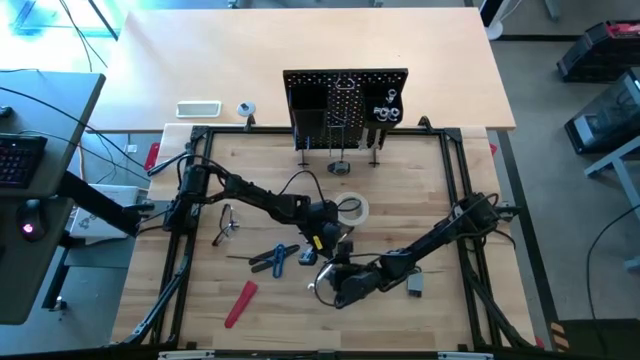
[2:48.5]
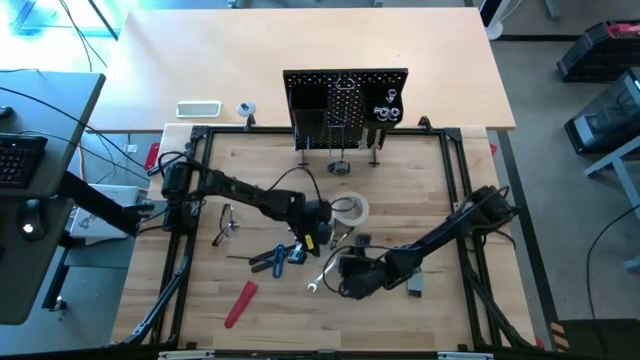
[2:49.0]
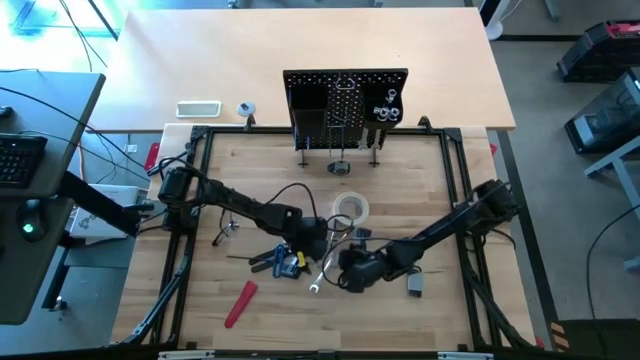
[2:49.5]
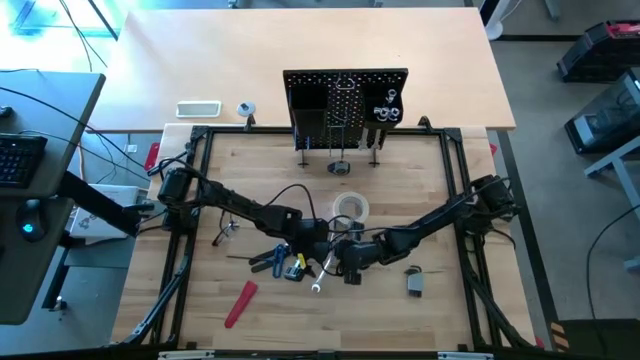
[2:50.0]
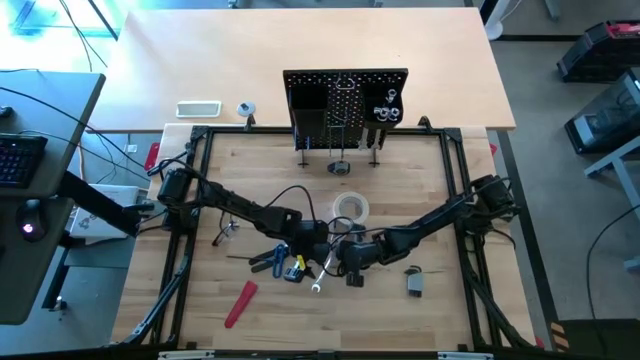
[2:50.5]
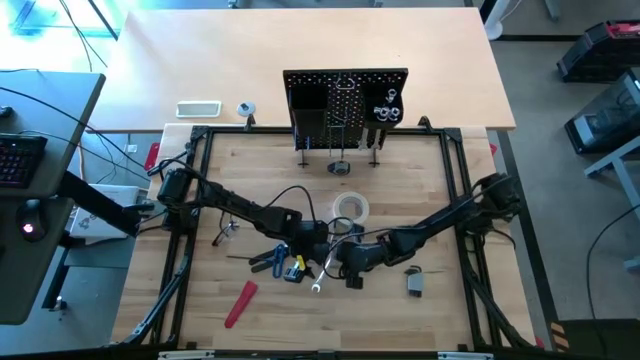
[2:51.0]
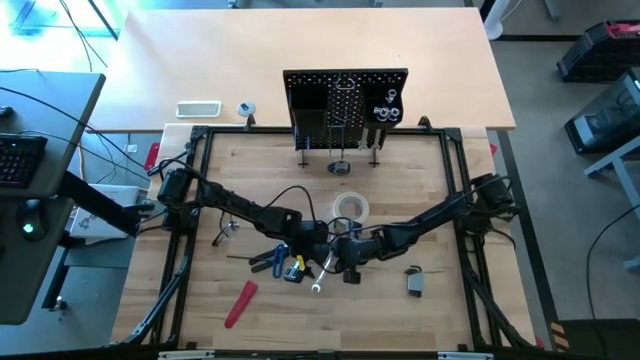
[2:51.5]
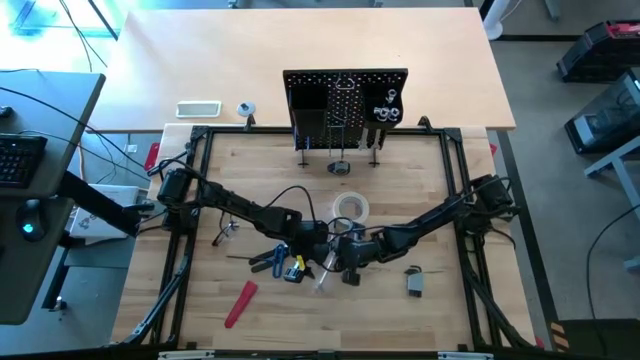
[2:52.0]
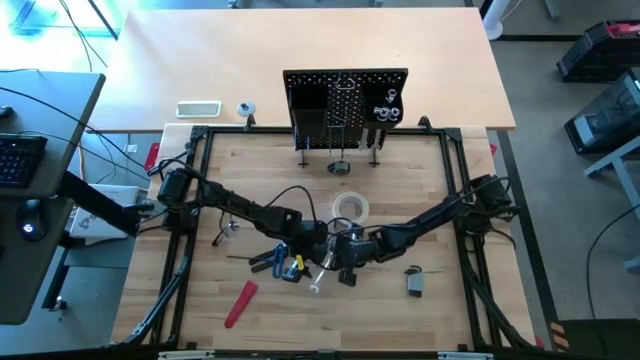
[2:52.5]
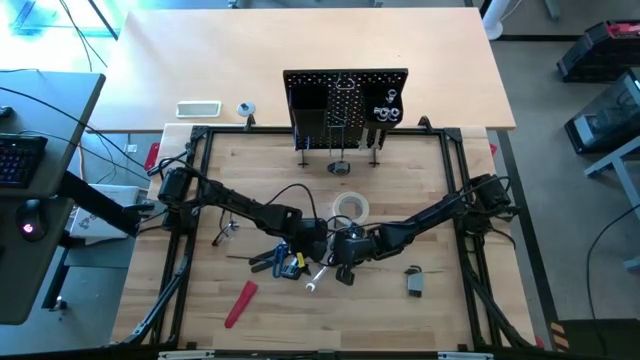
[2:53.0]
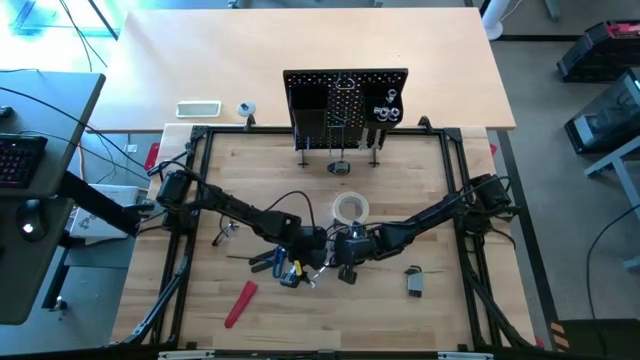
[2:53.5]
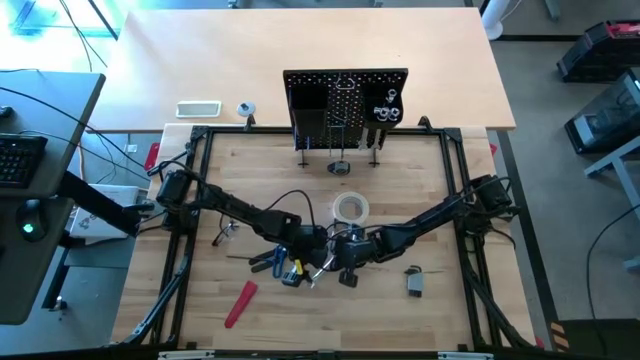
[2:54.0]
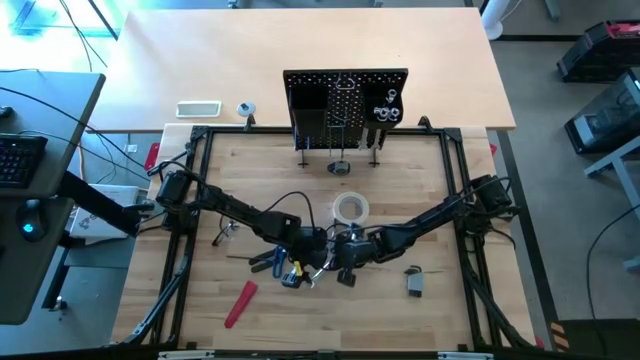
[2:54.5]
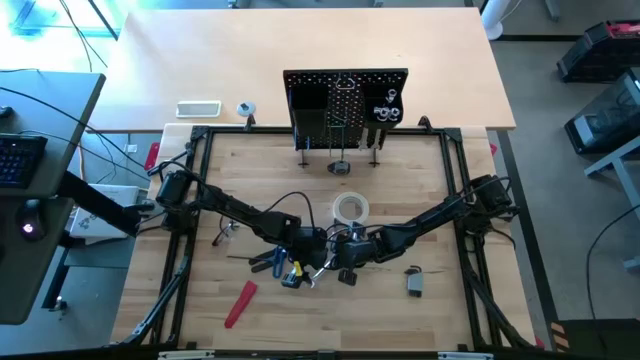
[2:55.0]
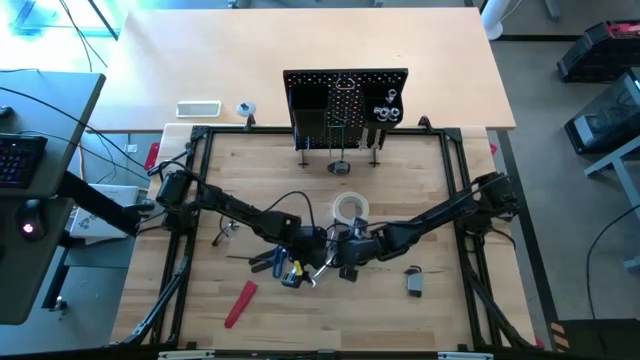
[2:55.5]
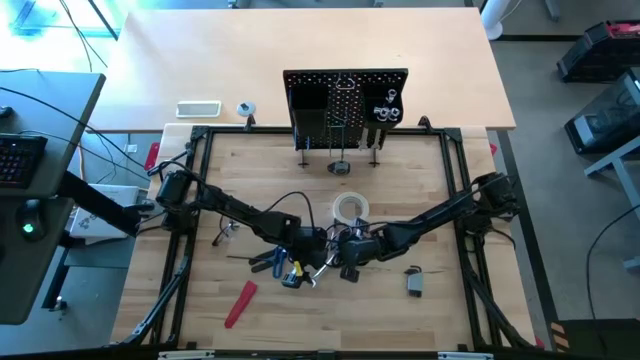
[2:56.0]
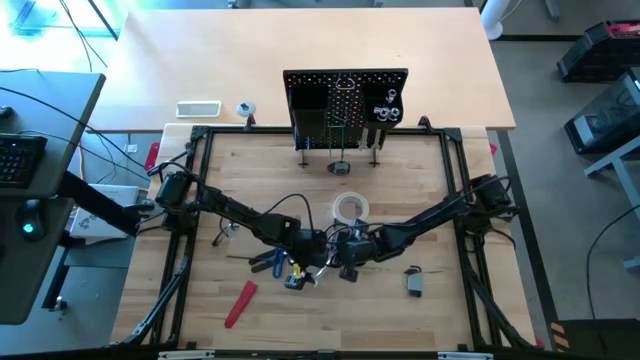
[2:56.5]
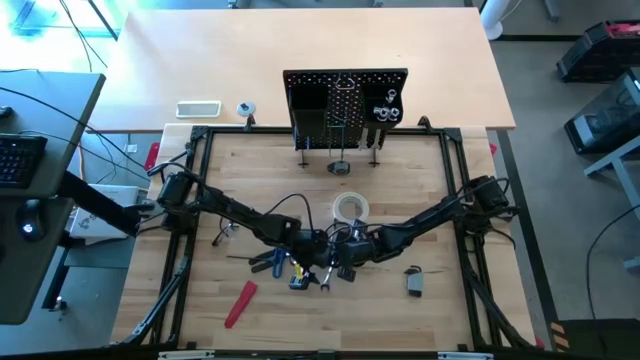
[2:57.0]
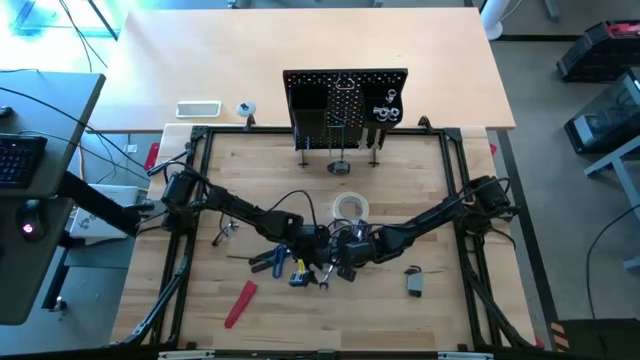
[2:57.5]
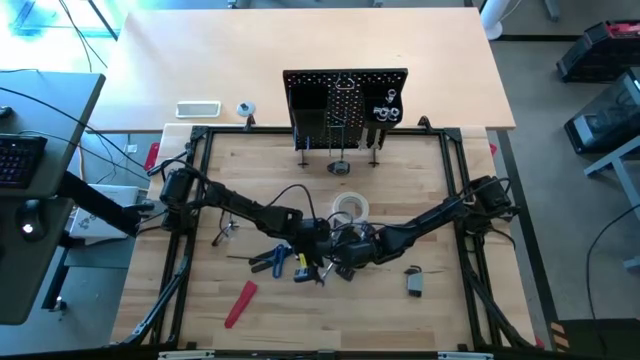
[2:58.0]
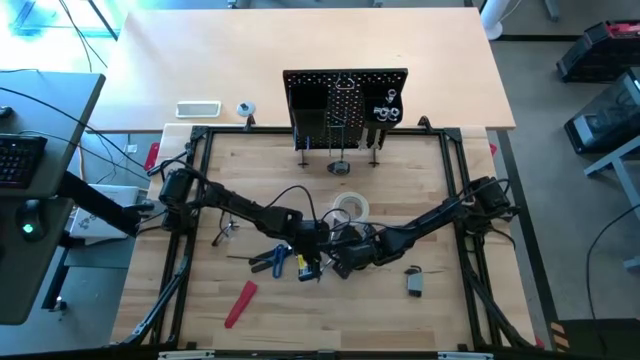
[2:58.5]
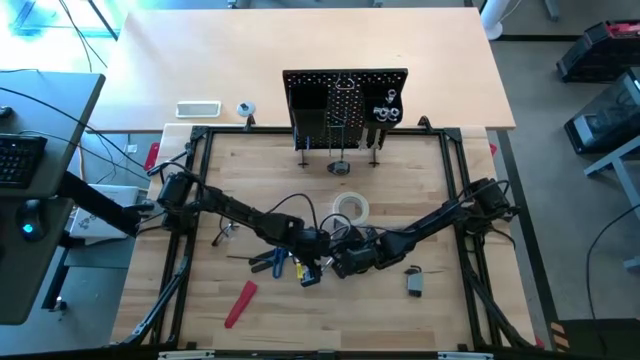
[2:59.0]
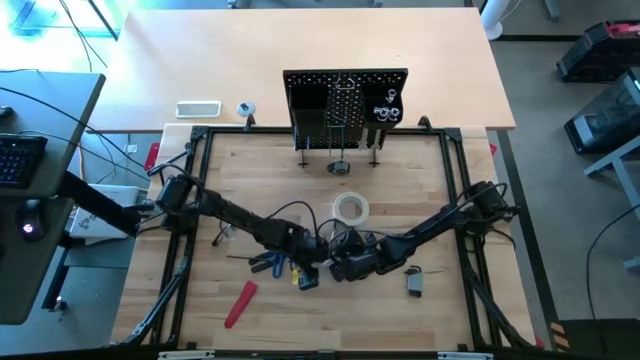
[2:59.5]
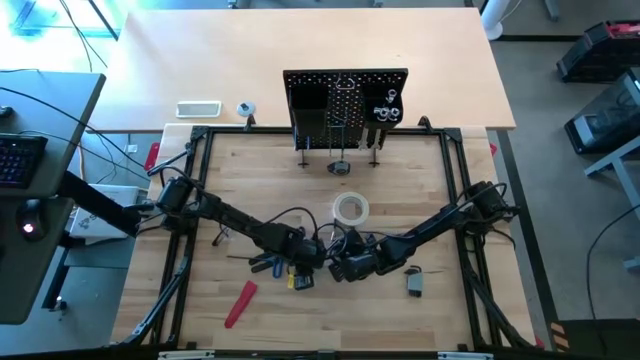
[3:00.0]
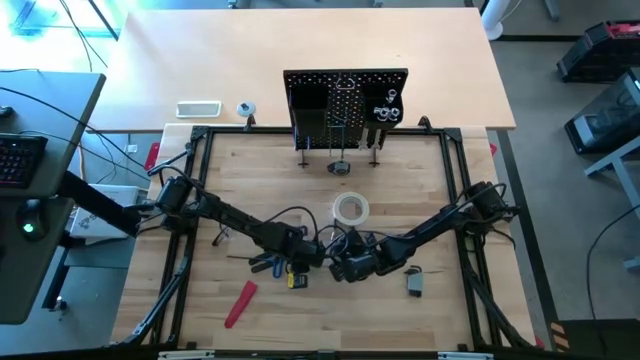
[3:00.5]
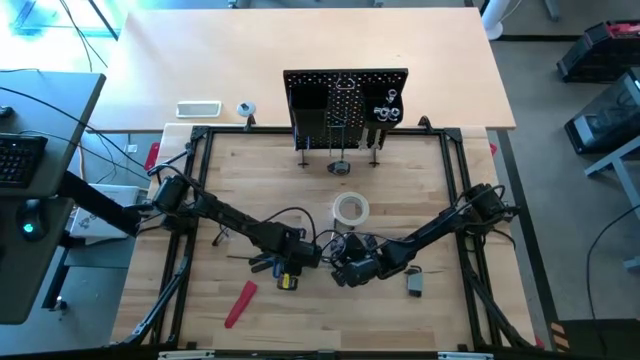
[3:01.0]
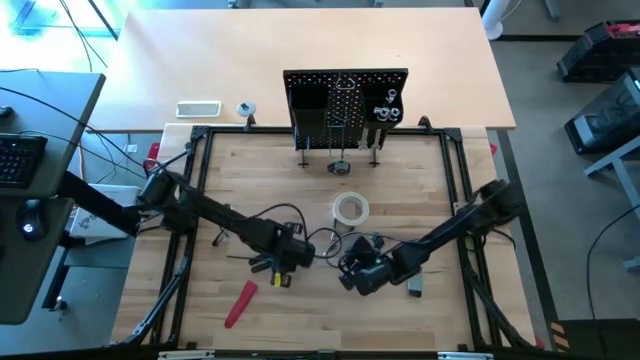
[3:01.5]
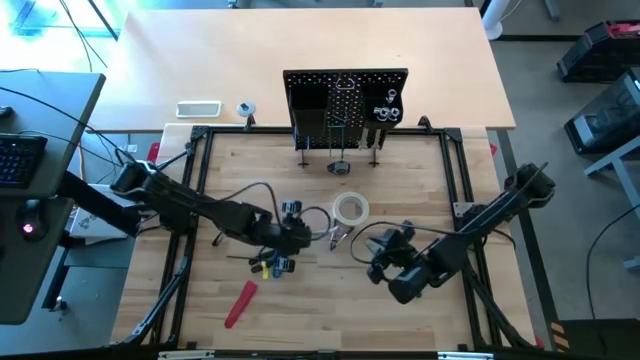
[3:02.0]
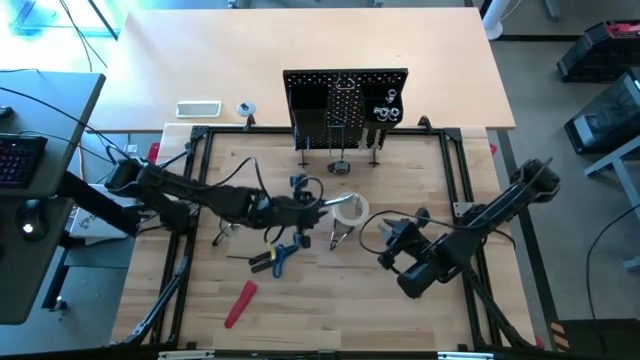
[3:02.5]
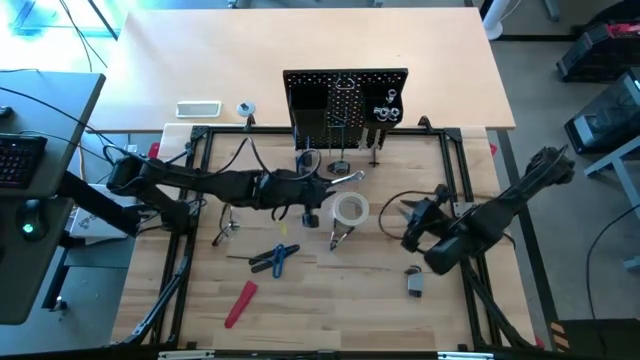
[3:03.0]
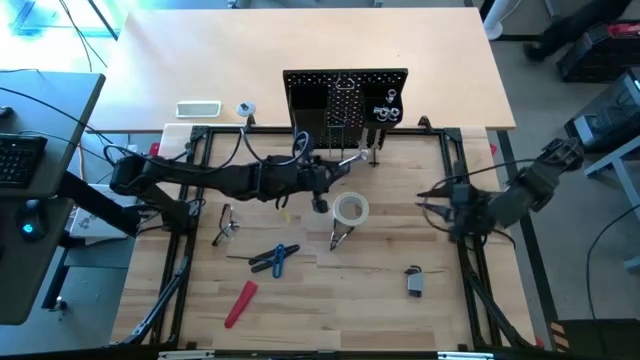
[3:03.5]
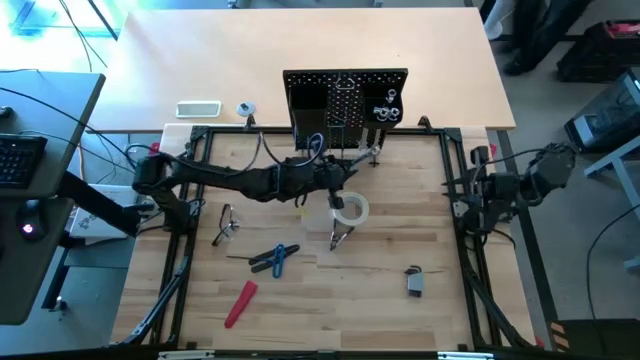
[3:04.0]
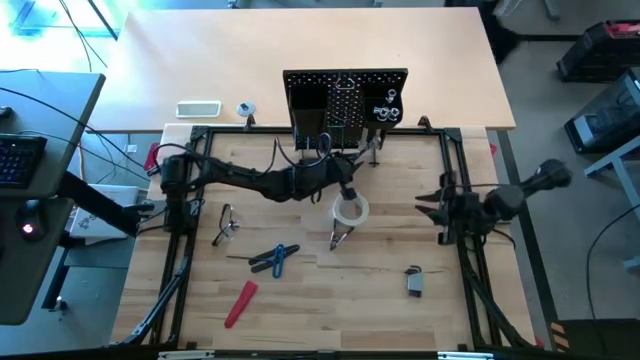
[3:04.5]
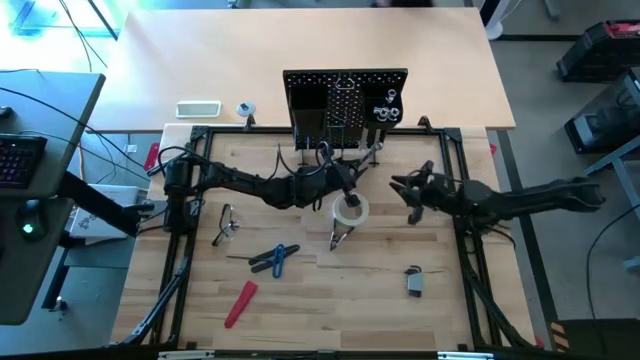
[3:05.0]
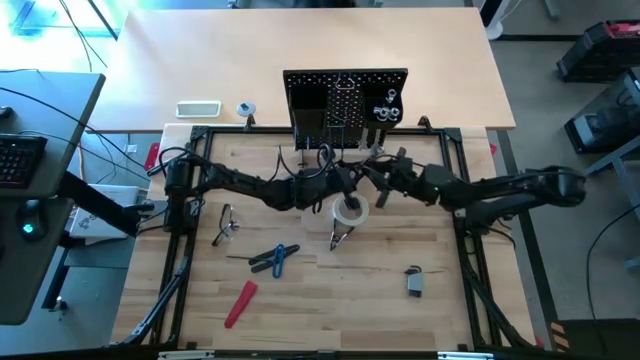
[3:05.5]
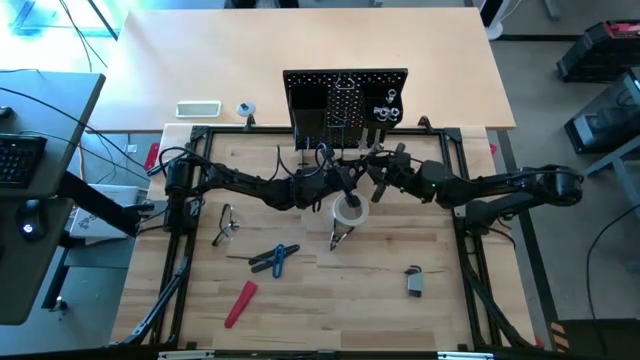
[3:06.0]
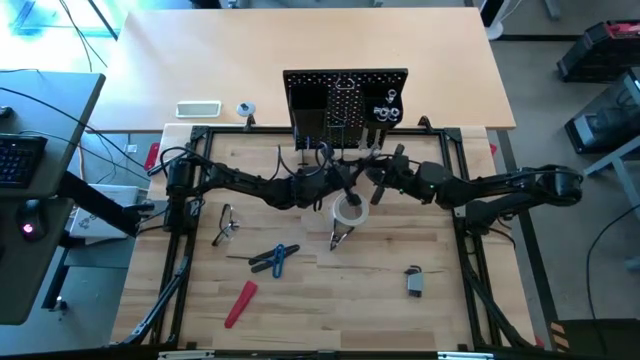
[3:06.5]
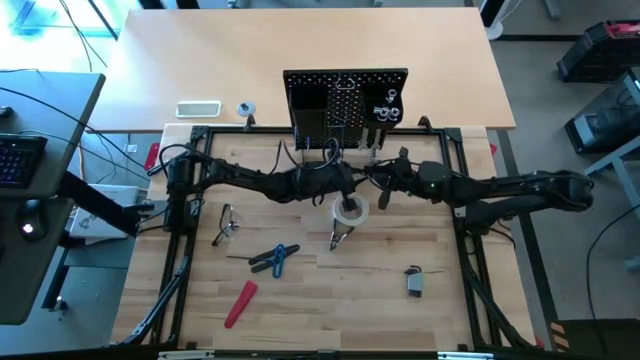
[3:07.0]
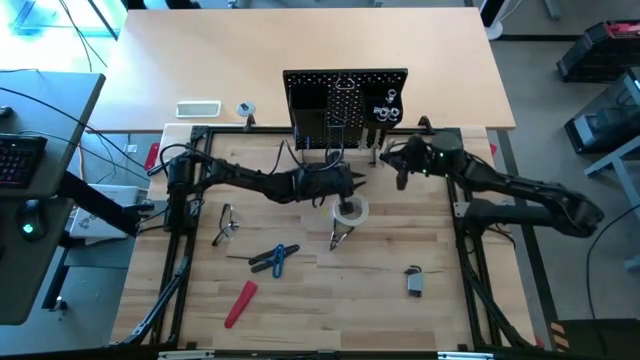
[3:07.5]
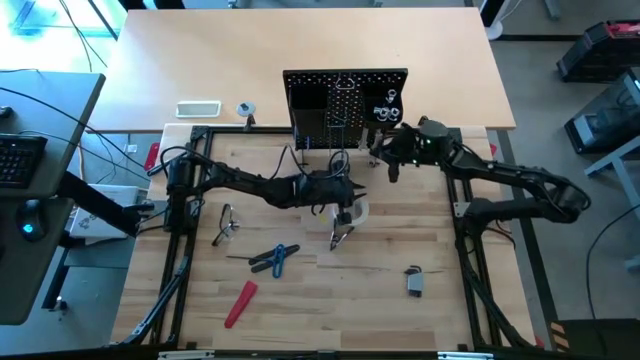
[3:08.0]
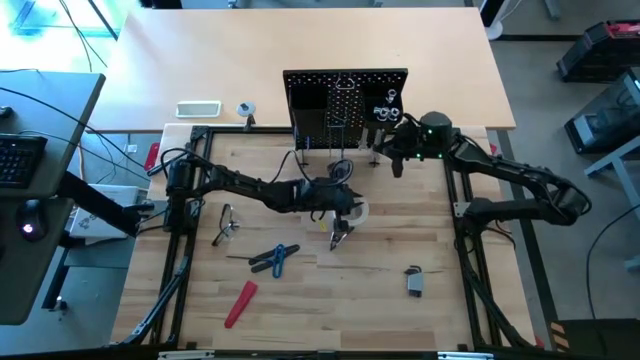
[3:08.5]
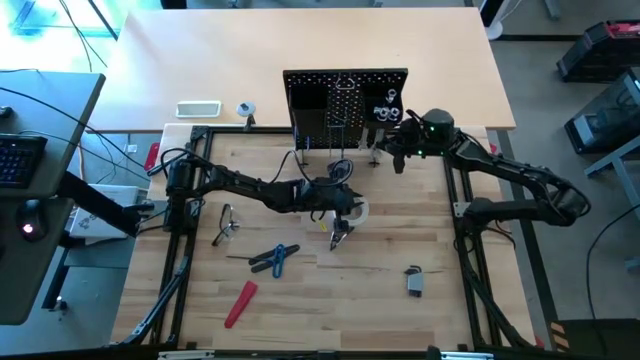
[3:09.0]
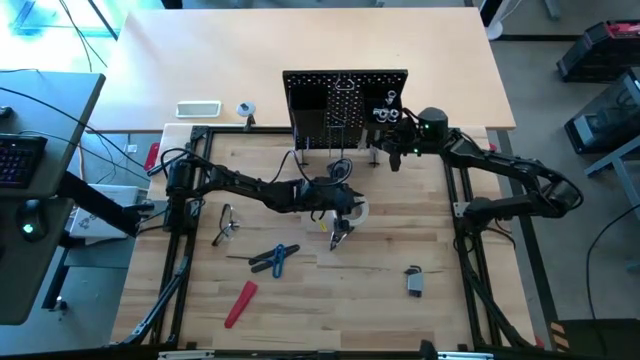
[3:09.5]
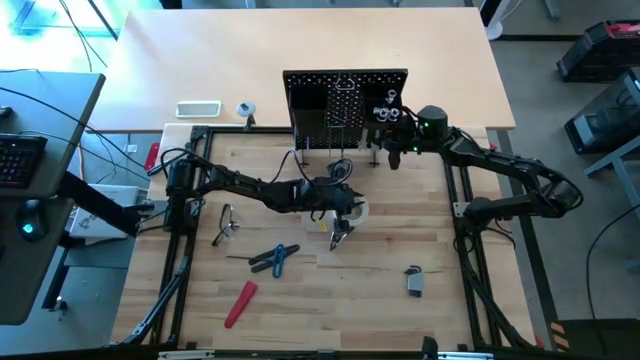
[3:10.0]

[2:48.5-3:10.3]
Task: Hang tools onto peg board
Hang the silver wrench on the peg board
